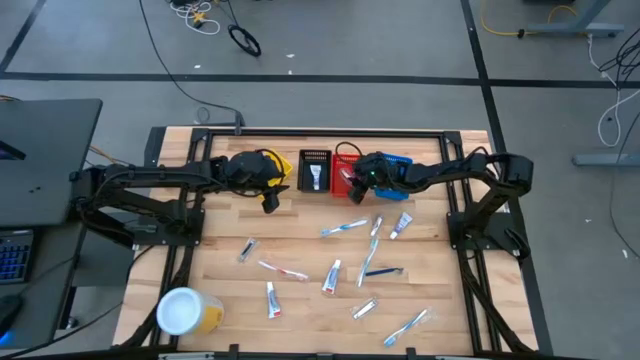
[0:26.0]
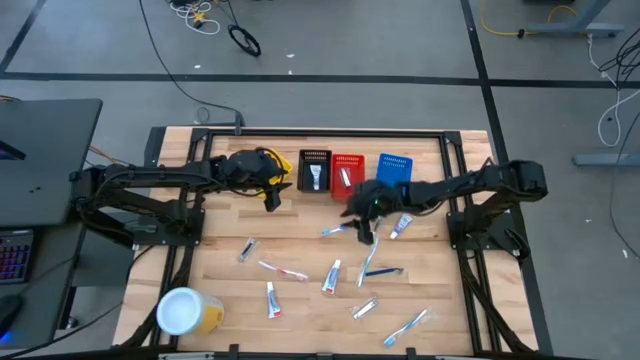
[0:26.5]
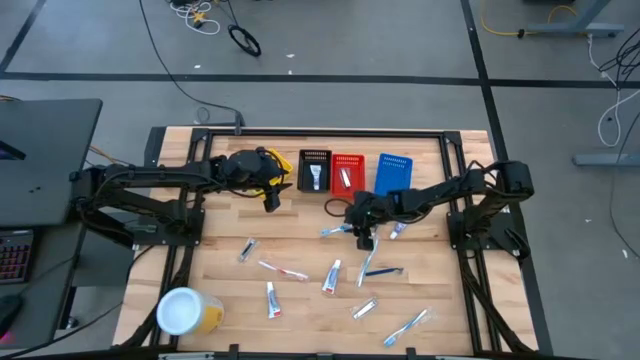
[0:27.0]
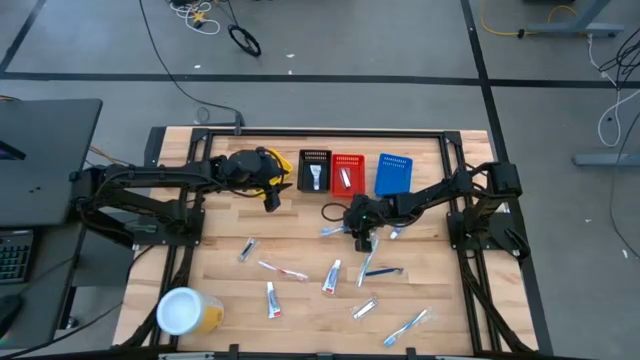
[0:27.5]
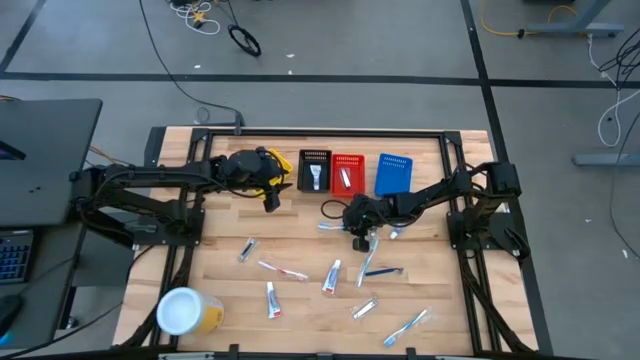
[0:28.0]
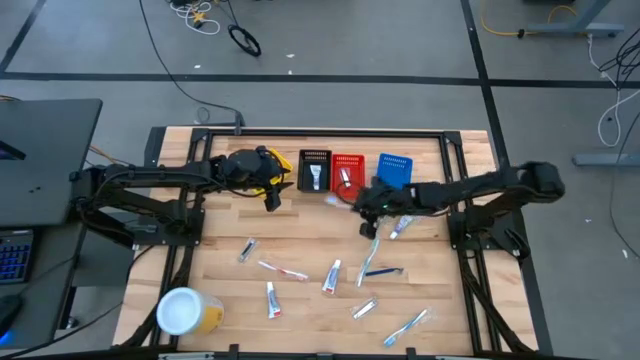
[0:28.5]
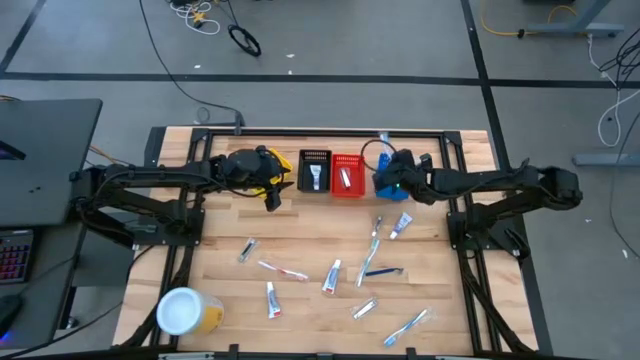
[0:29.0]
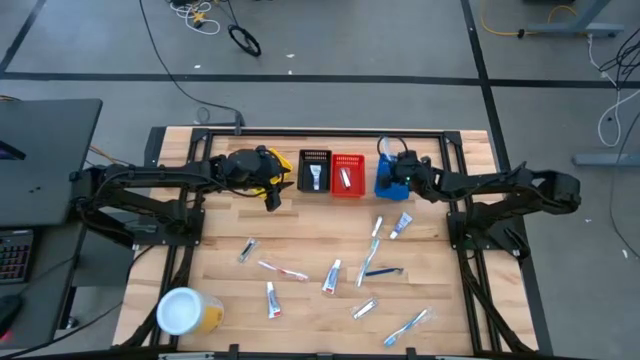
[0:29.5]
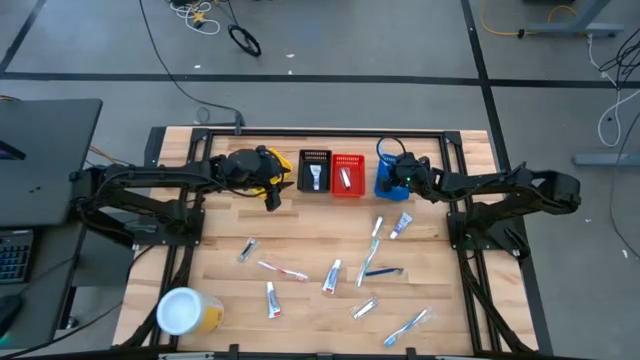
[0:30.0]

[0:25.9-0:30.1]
Task: Pick & Place Travel size toiletries
Put the blue toothbrush into the blue basket

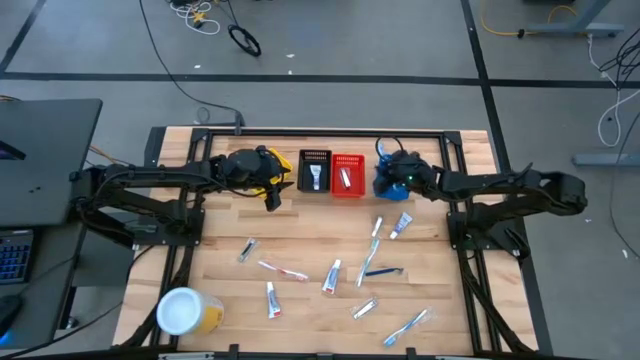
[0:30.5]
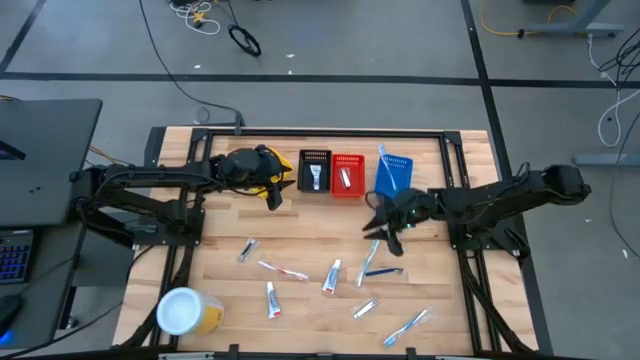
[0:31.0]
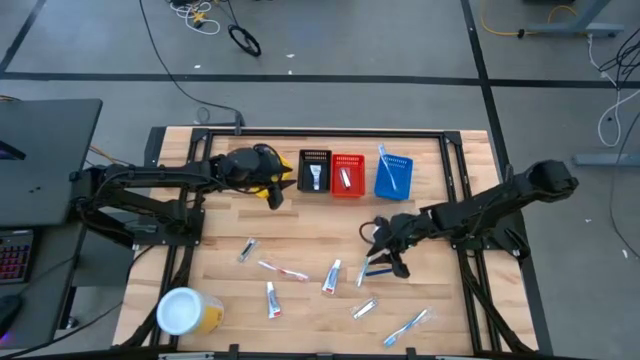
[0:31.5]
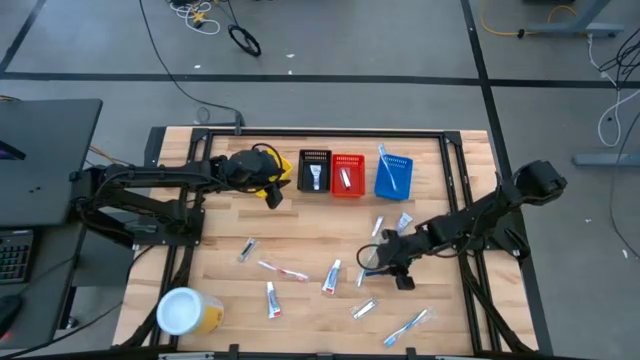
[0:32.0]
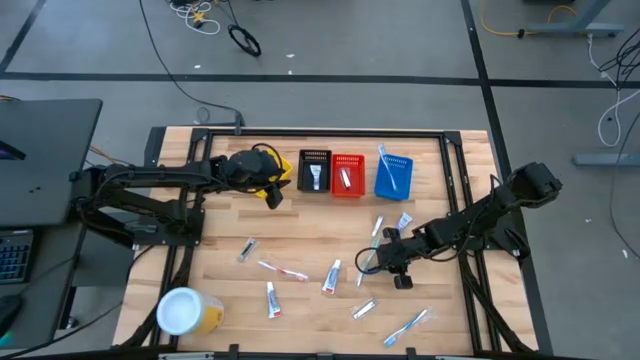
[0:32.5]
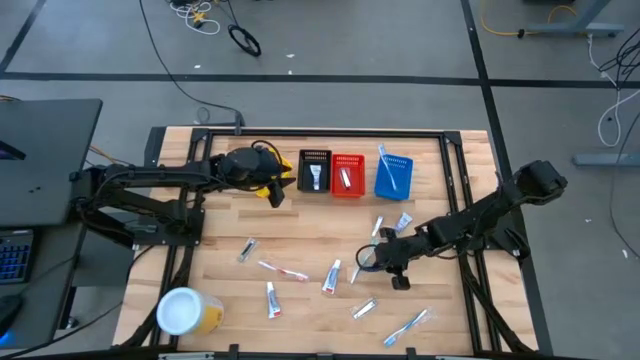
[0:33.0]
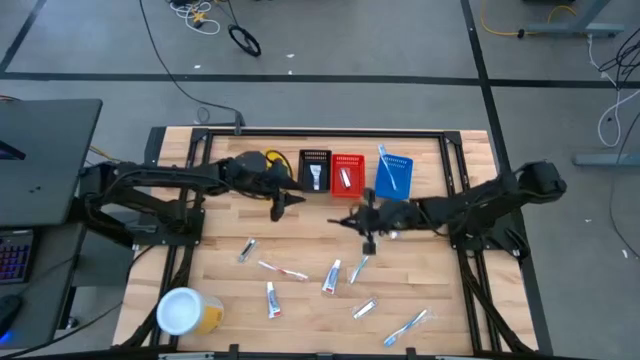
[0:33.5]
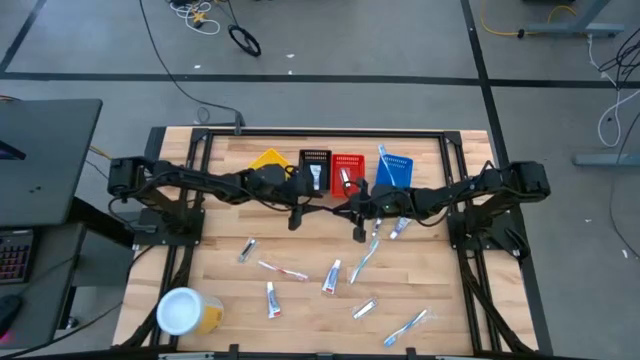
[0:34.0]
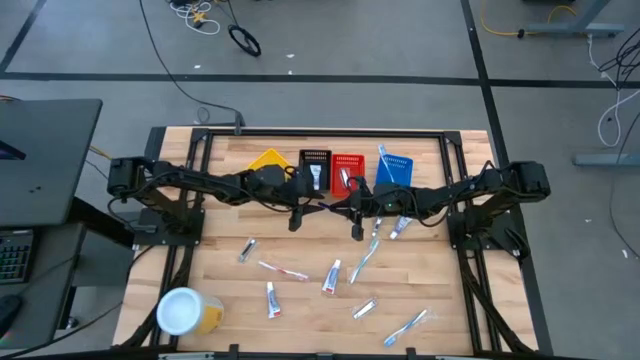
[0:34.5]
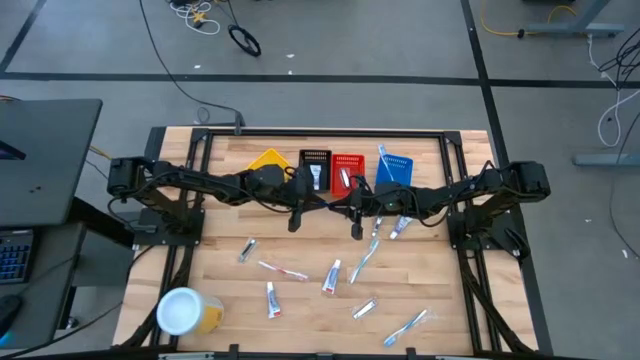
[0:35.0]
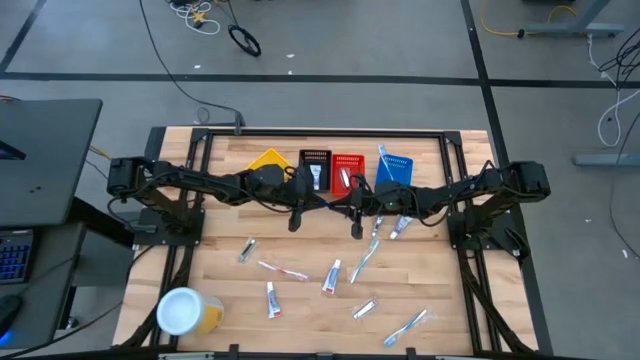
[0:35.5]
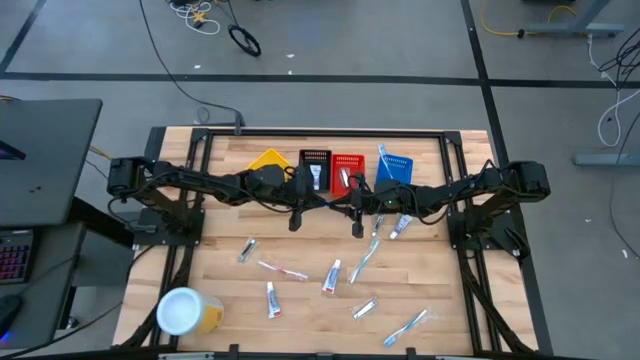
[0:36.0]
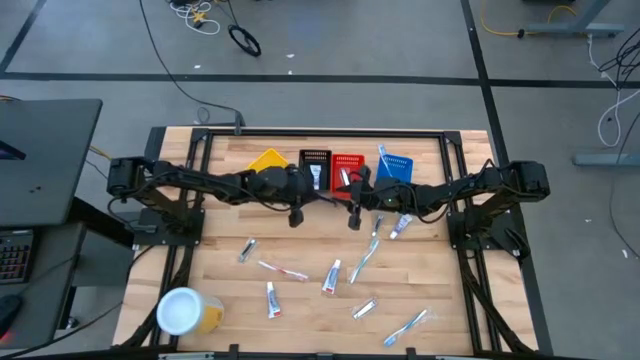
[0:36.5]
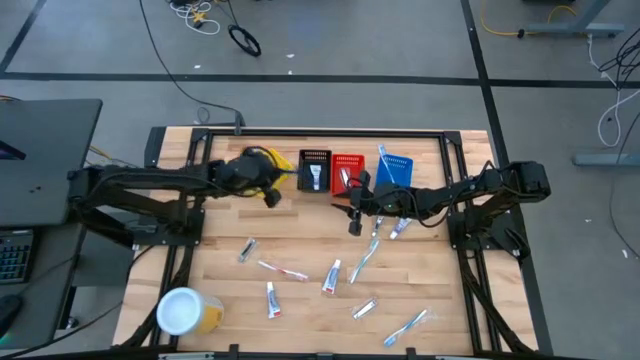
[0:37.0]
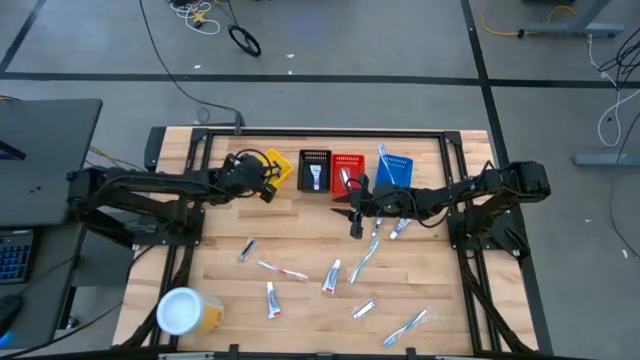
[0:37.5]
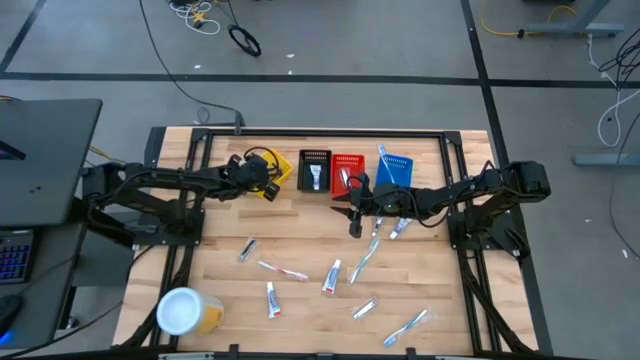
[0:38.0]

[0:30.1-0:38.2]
Put the blue shaver into the yellow basket

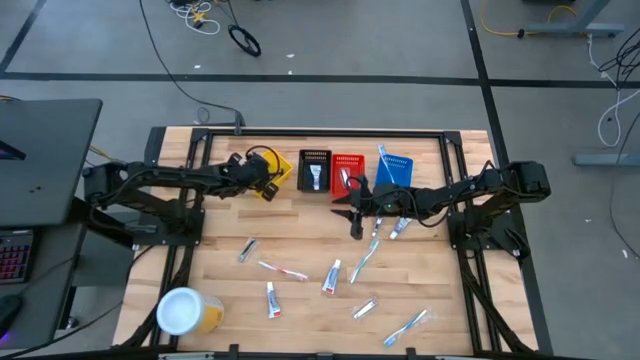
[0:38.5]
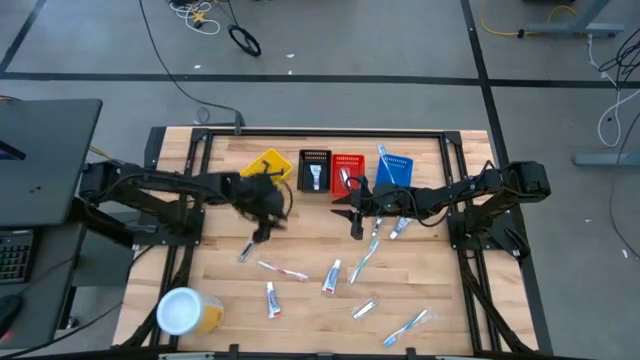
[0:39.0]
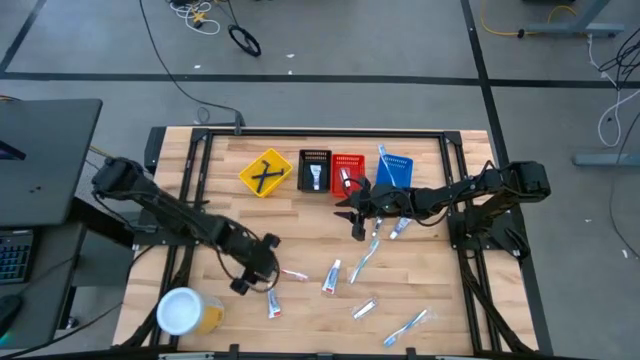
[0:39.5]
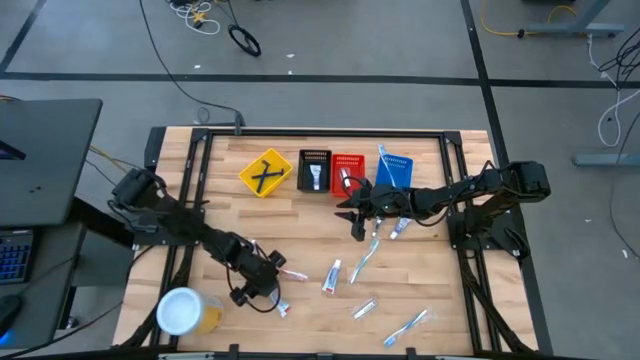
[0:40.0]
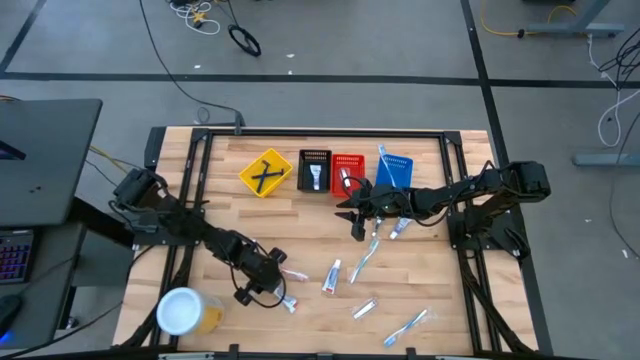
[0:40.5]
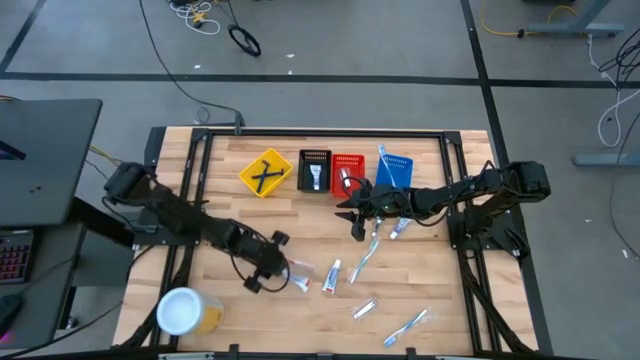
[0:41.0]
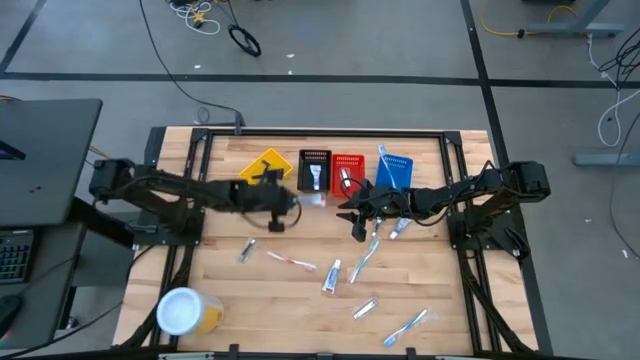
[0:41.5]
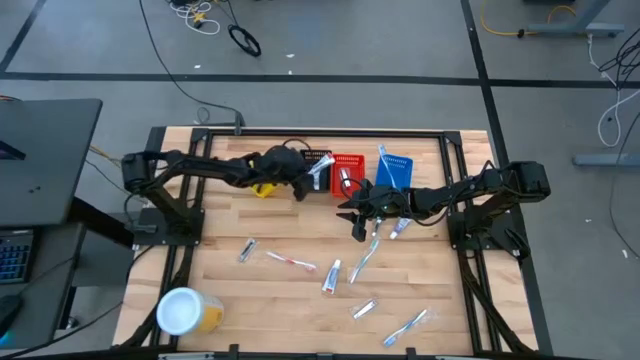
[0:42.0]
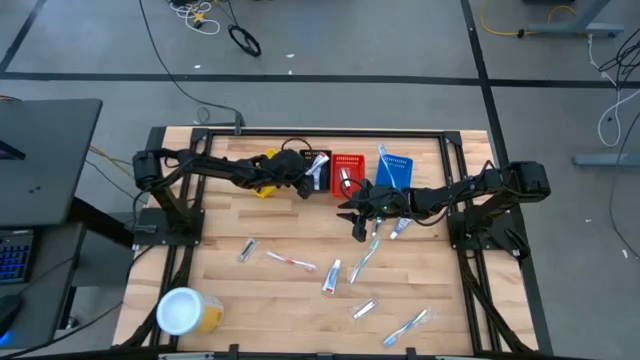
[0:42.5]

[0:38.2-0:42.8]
Put the white toothpaste into the black basket

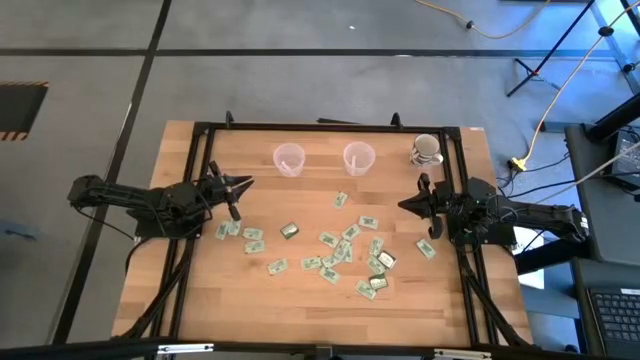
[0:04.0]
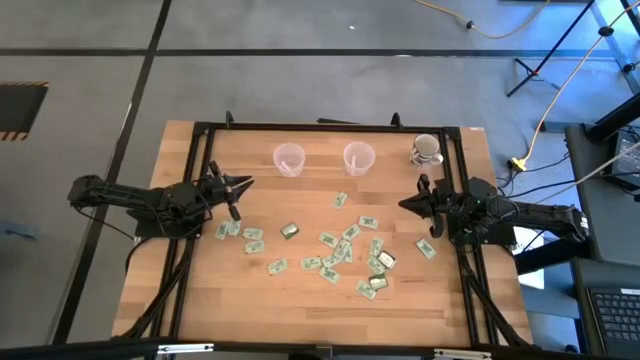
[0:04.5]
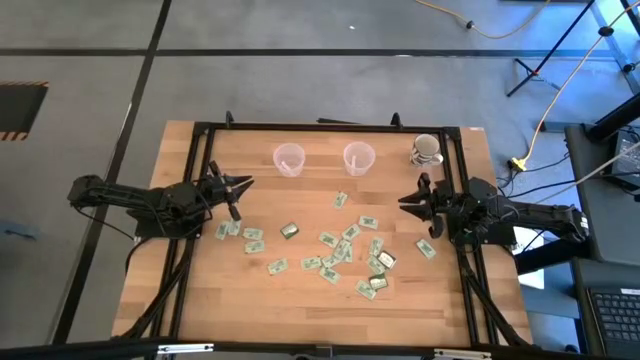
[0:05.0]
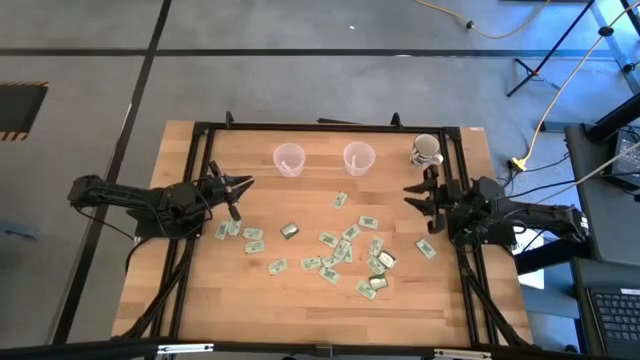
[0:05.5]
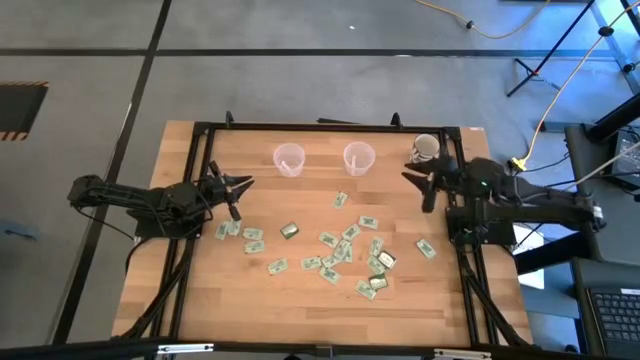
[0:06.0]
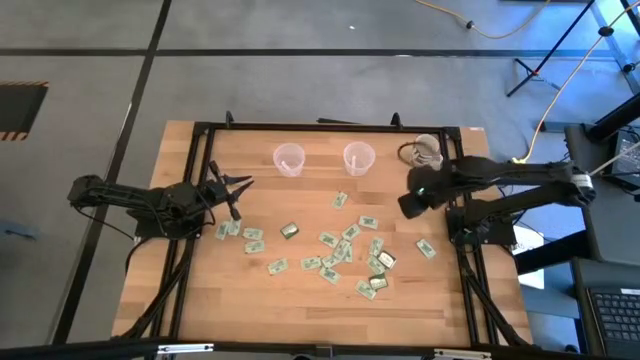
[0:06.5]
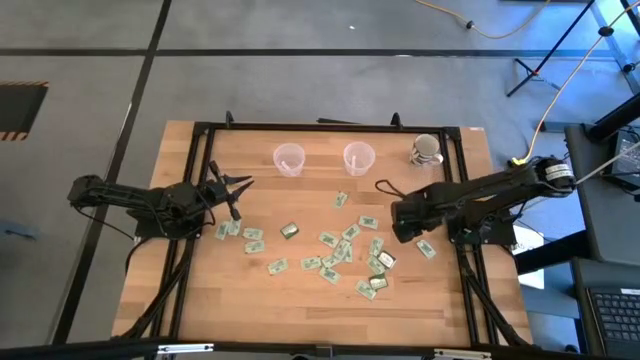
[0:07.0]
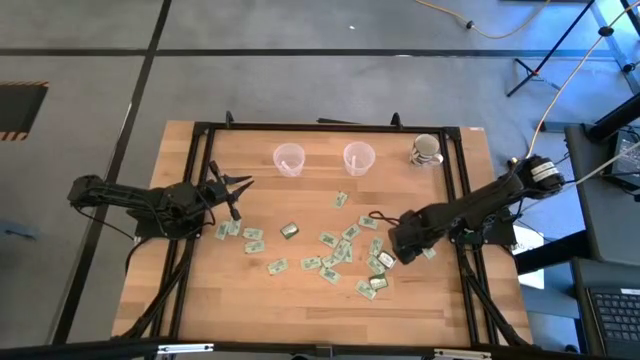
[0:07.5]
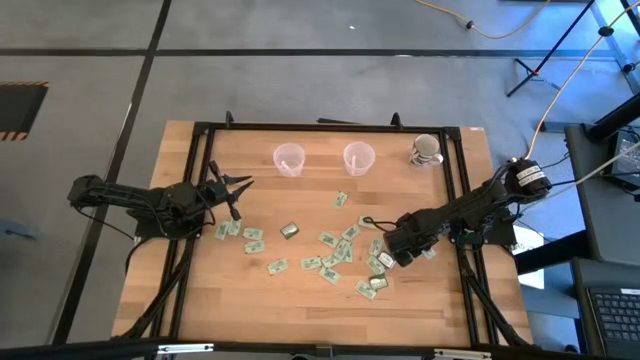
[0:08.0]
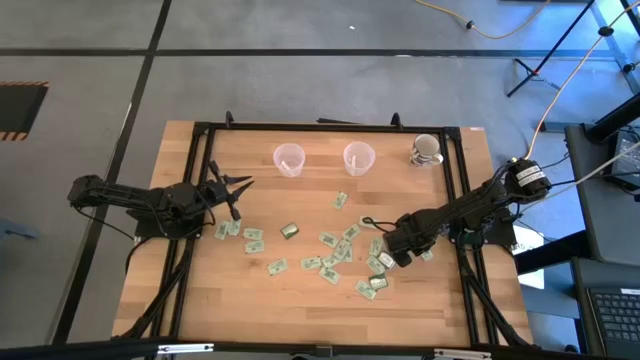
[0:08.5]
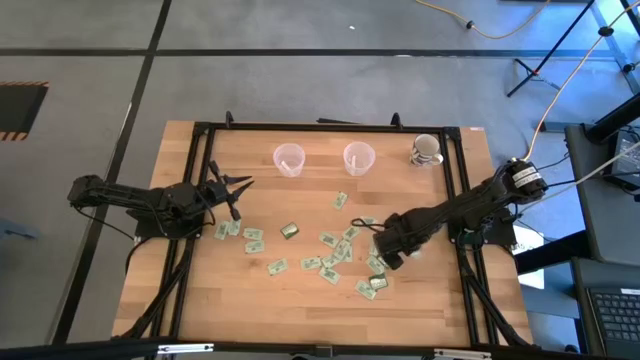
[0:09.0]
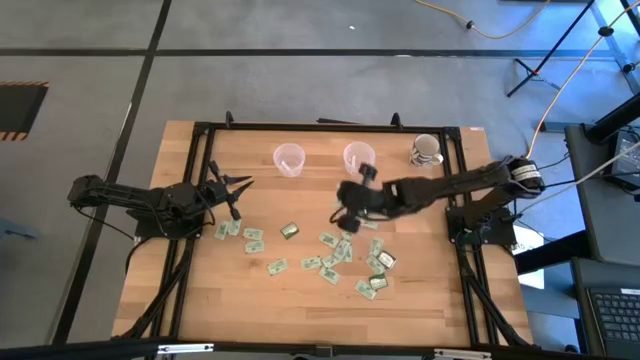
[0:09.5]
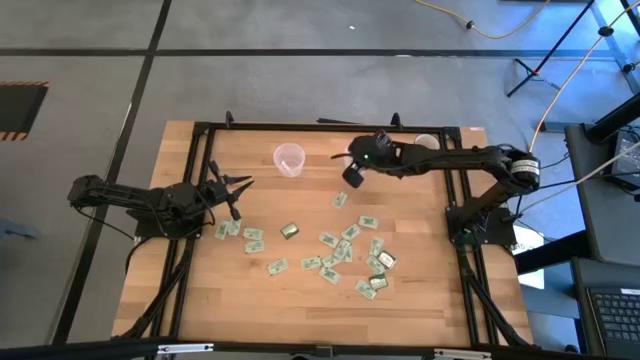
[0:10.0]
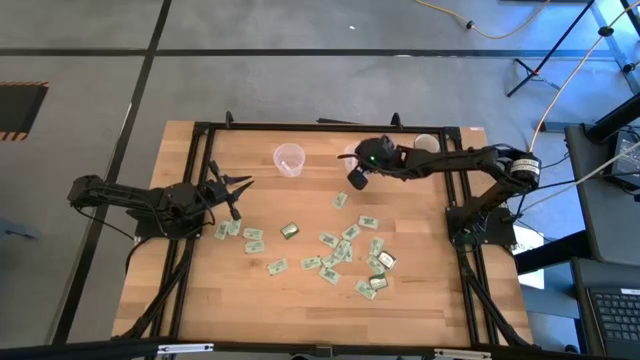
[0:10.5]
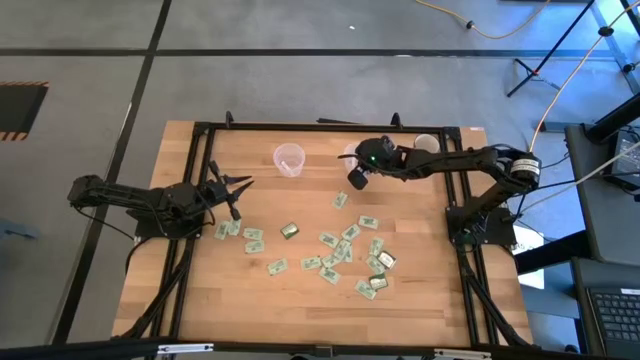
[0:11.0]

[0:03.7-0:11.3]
Task: Pick and place Stevia / Truvia into bins
Put the stevia packet into the right transparent container
